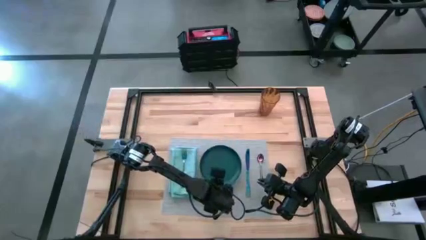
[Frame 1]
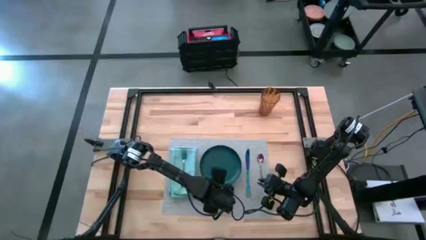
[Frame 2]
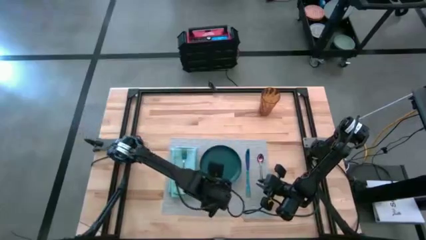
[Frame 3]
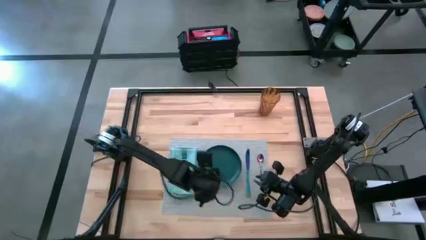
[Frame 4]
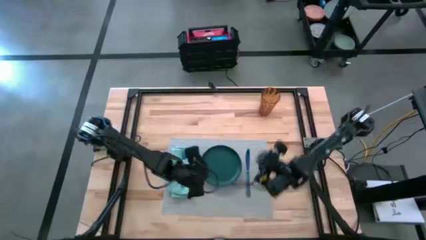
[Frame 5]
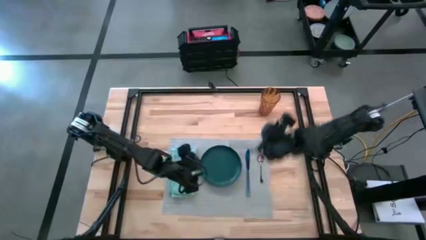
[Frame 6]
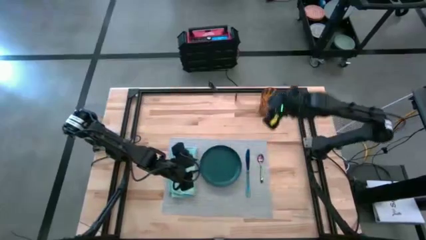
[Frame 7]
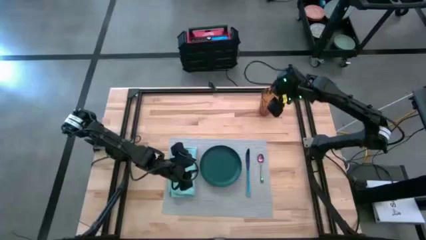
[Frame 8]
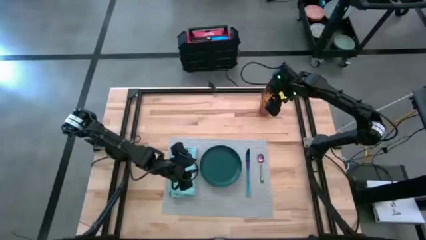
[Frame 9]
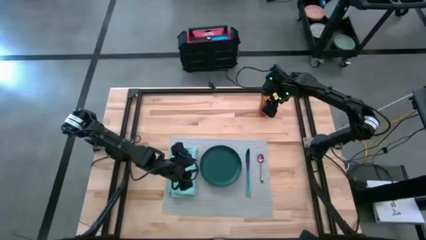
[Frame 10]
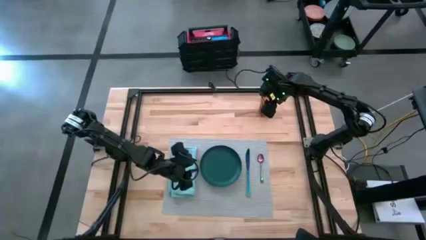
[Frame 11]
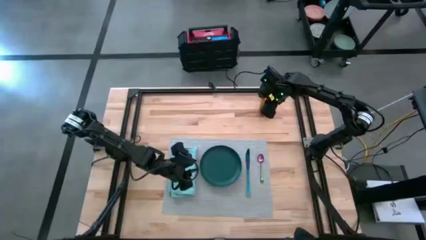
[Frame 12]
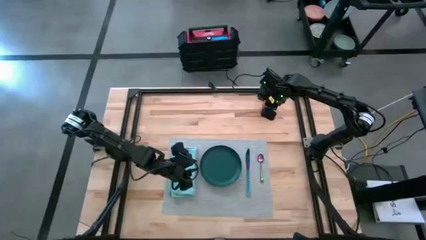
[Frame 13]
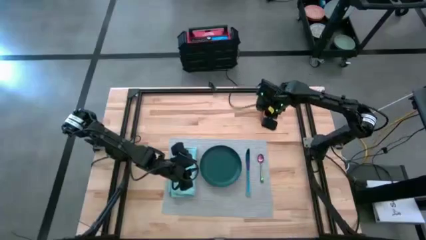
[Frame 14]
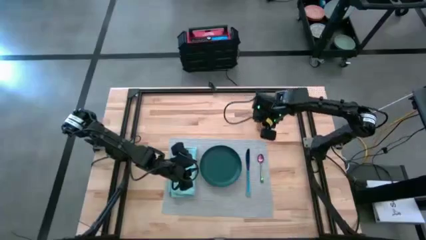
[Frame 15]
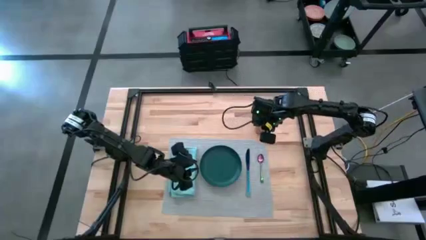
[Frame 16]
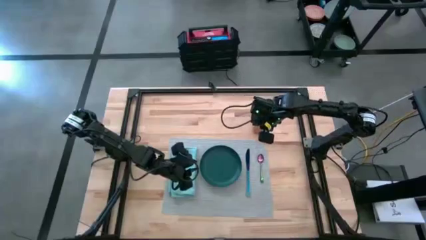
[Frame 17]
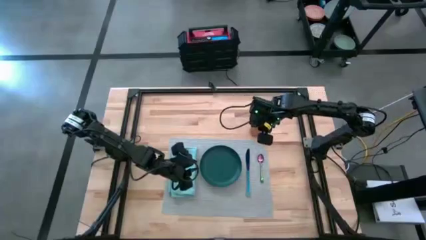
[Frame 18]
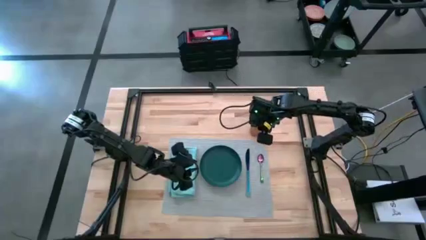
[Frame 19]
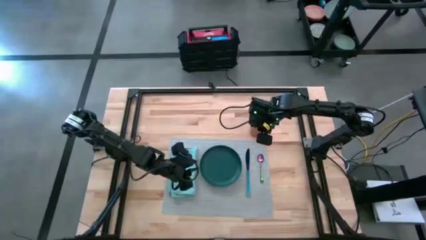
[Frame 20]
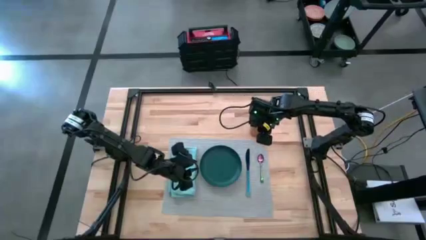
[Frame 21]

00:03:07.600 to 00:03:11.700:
Task: Set table place
Move the brown cup to the top right of the gray tablemat

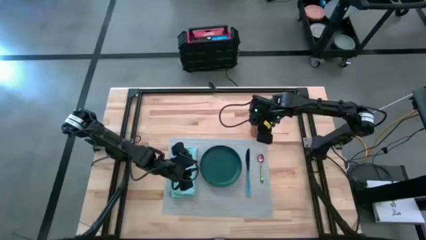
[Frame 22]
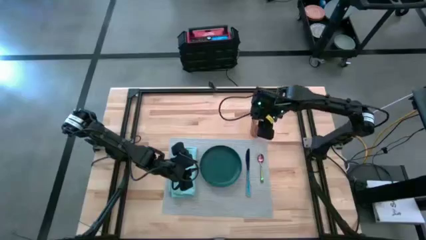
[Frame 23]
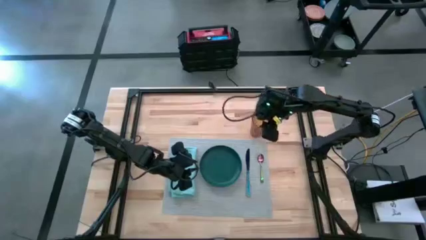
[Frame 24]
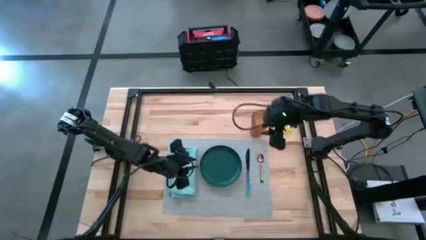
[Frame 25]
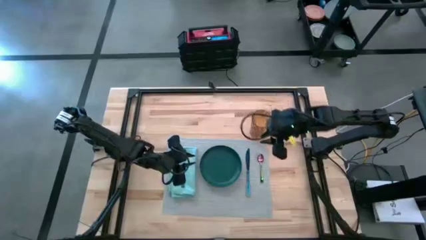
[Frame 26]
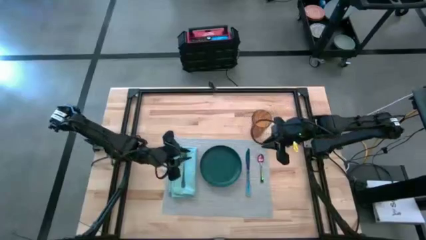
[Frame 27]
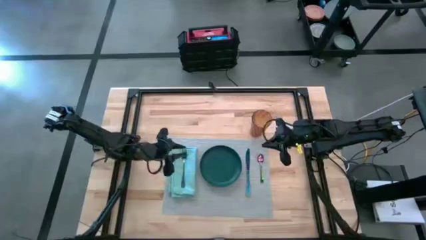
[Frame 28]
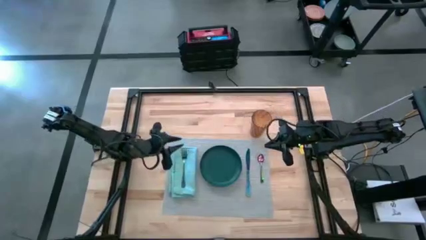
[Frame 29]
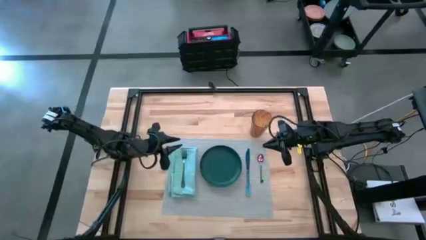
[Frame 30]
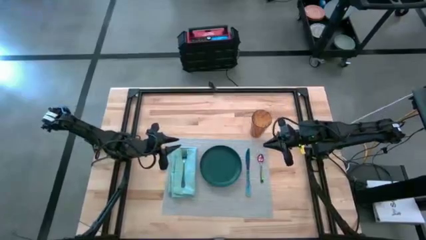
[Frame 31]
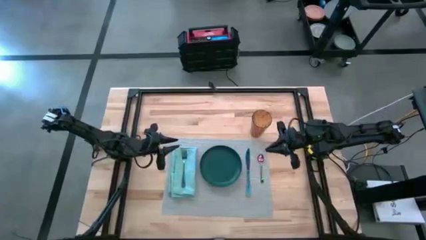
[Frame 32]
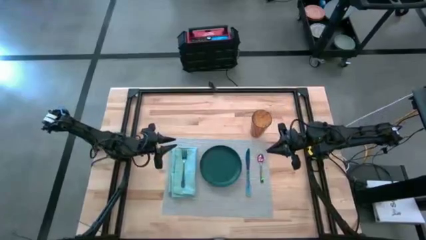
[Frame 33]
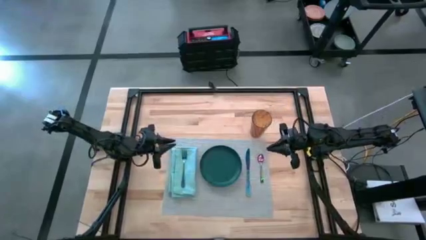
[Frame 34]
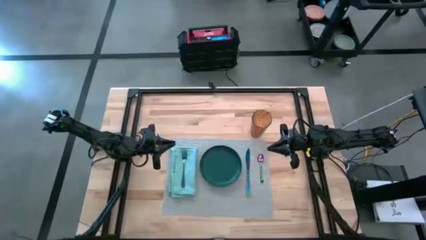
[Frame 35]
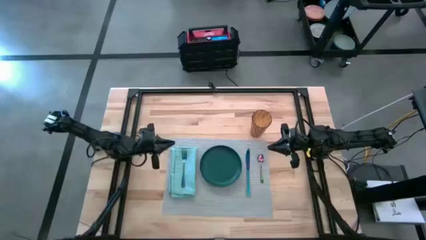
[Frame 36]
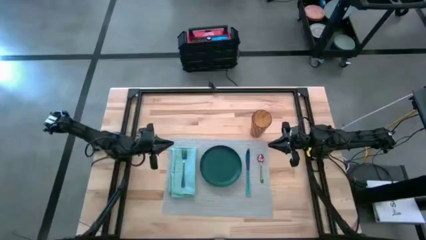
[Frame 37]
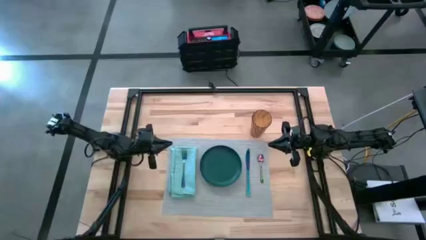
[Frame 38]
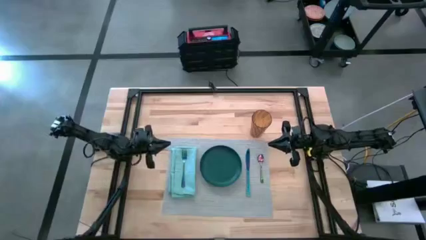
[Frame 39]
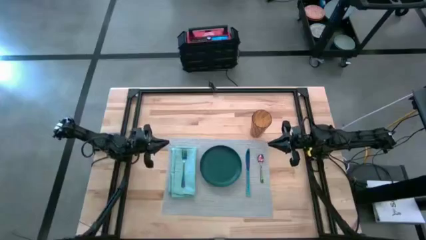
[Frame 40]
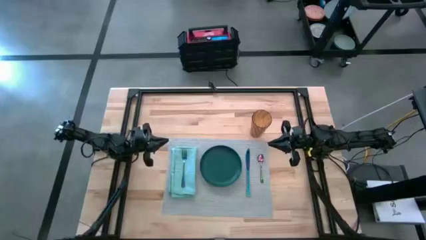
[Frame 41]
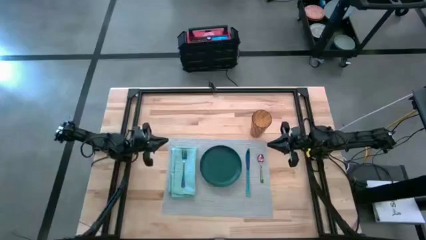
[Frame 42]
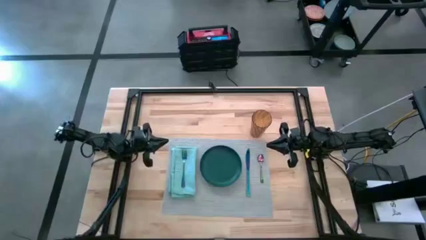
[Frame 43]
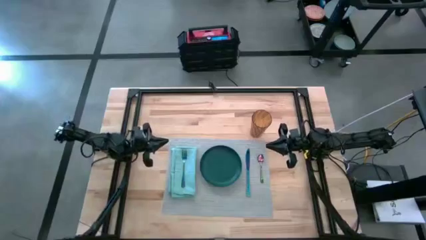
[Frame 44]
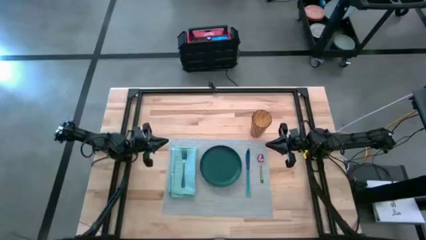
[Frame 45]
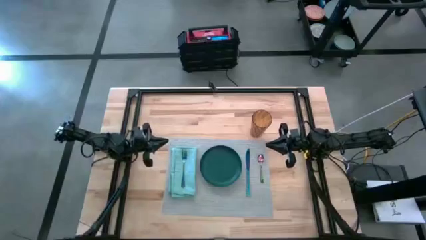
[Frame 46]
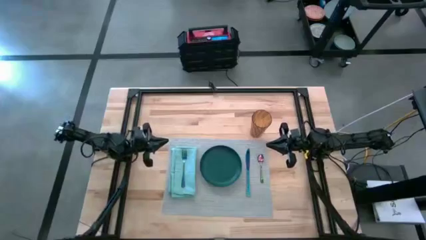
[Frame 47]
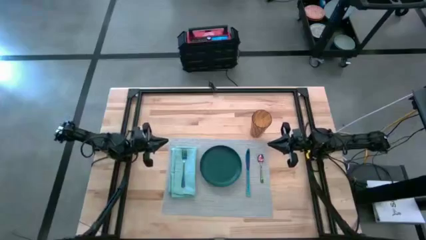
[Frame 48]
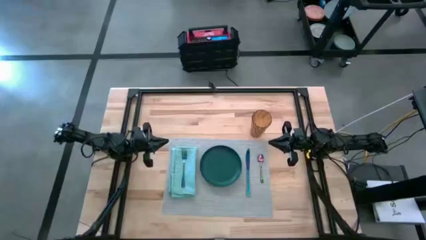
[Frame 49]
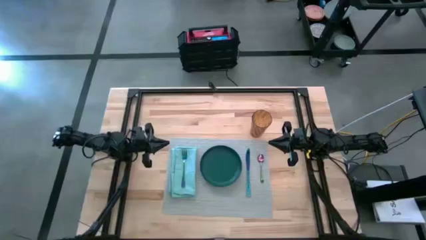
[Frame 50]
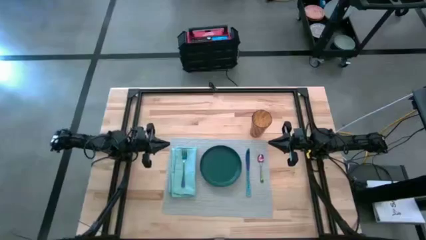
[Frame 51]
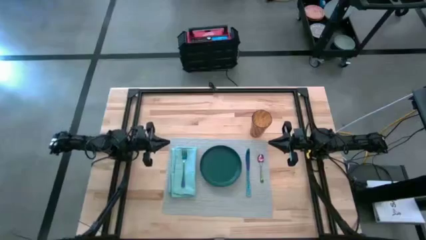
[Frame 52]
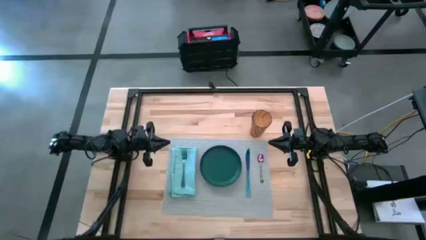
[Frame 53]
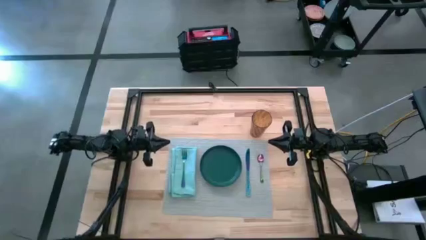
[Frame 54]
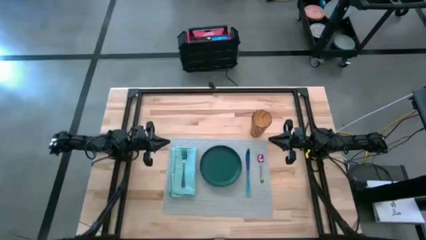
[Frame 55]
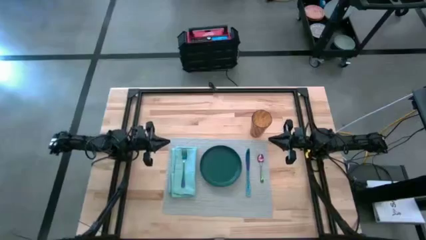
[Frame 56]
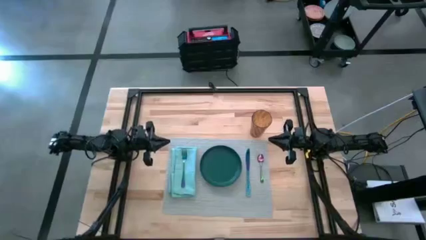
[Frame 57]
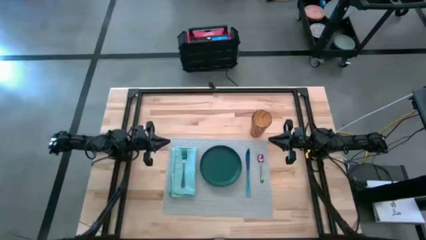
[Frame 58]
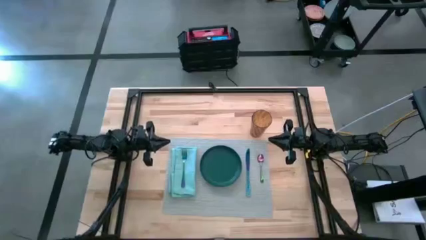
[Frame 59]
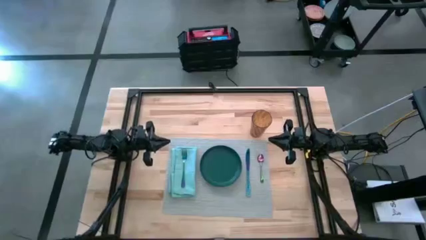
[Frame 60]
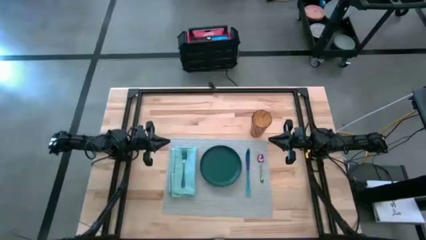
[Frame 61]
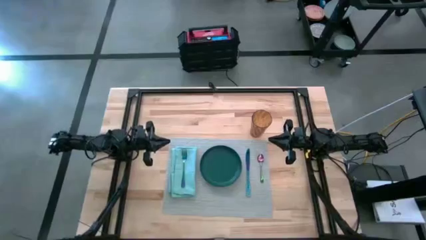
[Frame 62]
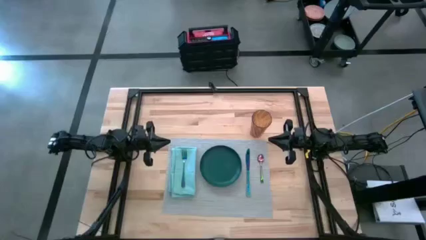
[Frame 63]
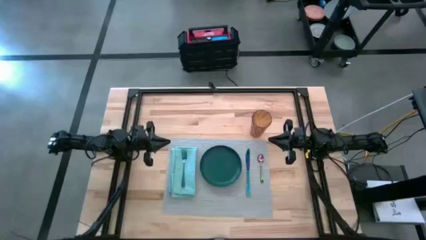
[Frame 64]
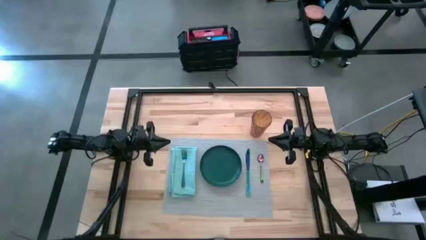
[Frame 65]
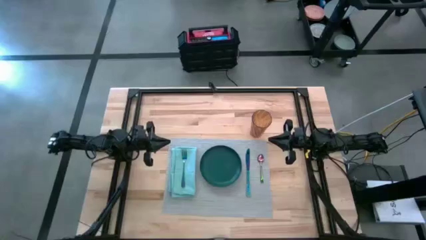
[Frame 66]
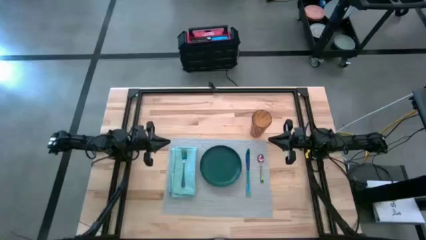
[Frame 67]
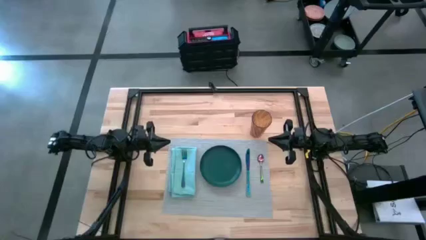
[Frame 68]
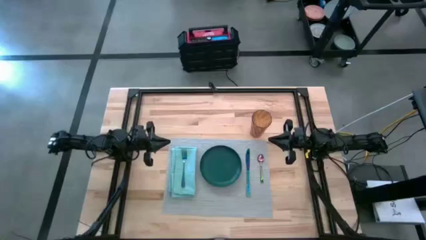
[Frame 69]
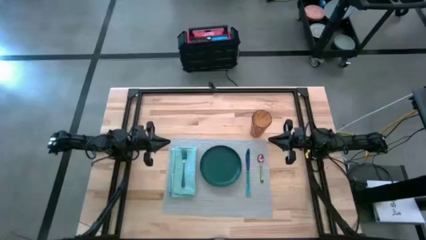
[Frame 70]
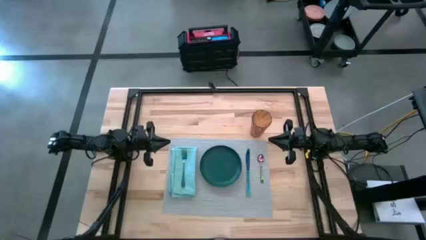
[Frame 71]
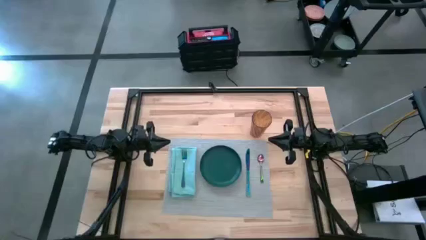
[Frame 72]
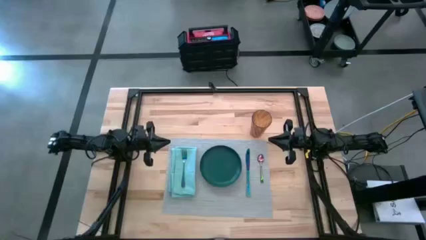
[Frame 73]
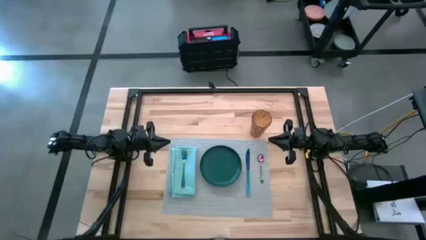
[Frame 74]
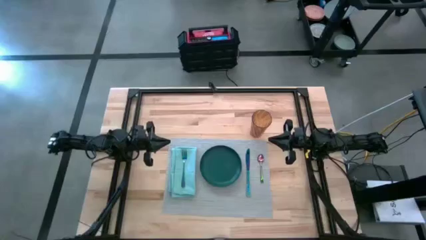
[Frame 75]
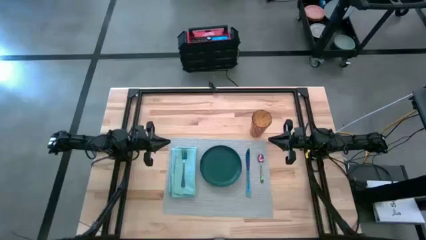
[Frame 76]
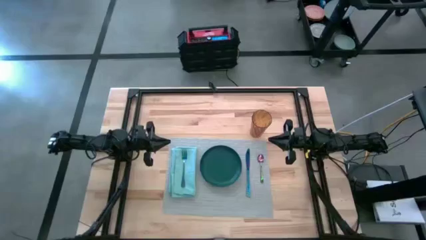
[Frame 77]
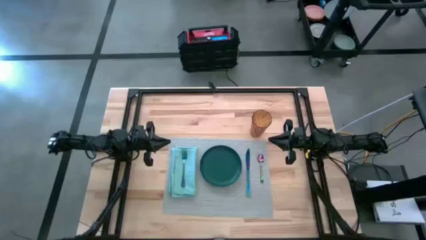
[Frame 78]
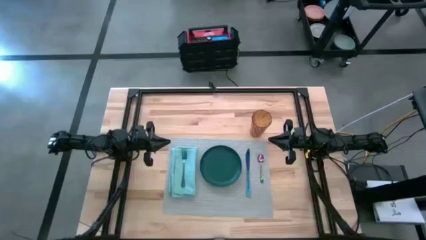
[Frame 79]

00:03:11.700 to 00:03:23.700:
Return to Home Position

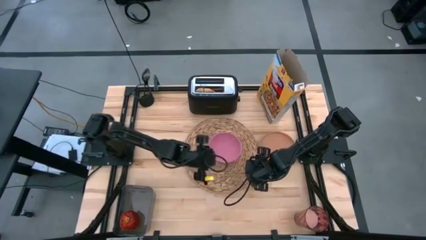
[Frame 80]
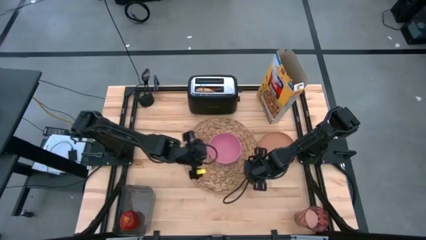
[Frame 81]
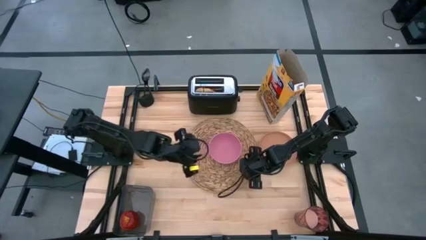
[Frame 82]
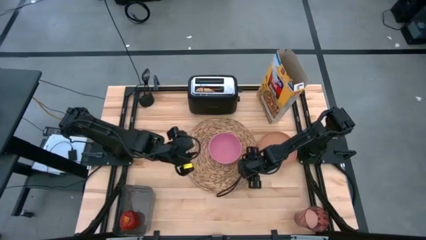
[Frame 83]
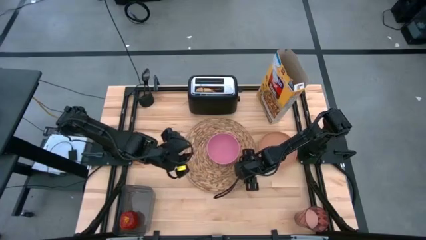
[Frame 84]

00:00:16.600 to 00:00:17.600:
Task: Arrange a breakfast setting
Adjust the brown placemat

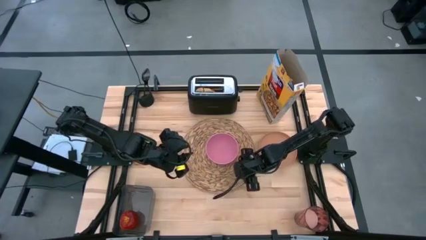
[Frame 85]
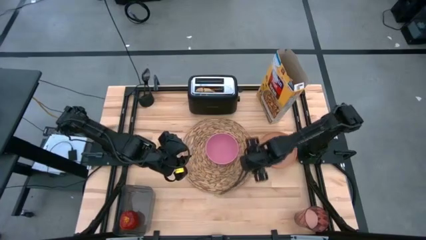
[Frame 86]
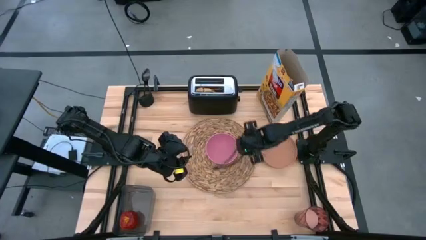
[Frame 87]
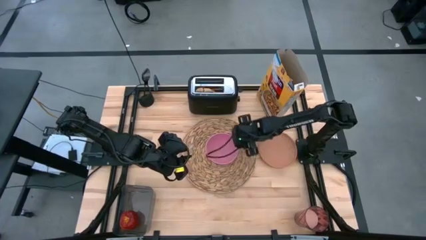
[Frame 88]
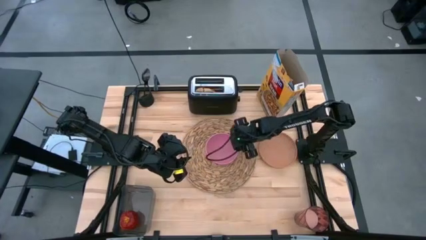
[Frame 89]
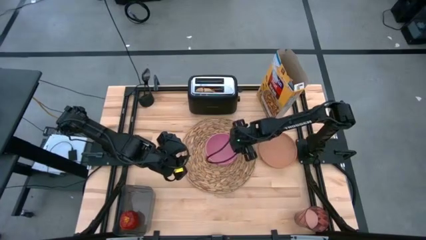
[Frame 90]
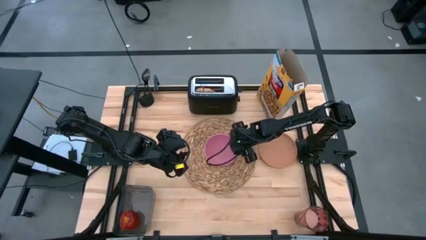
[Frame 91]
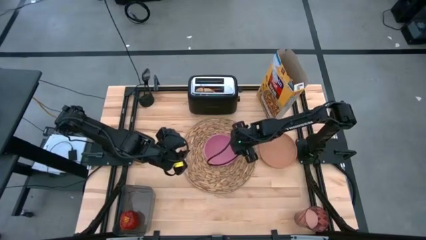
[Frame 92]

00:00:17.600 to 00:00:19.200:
Adjust the pink bowl on the brown placemat
